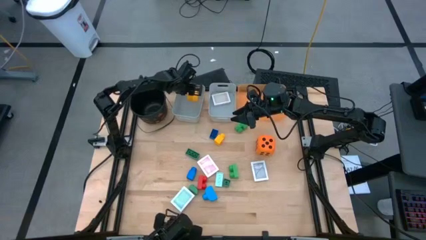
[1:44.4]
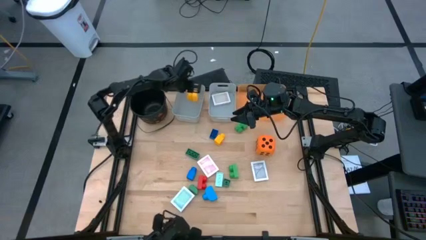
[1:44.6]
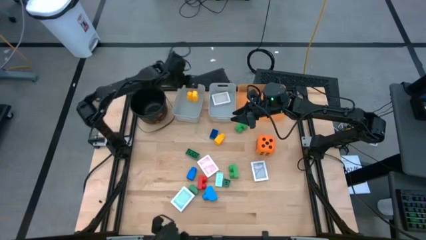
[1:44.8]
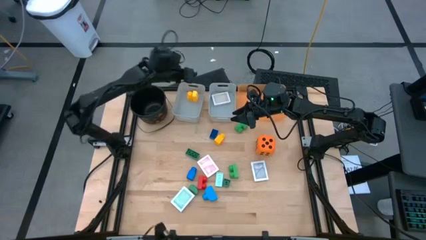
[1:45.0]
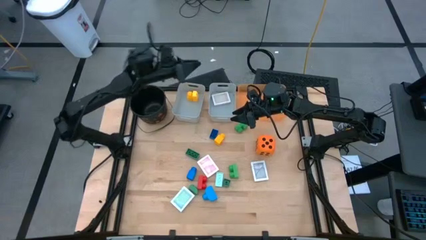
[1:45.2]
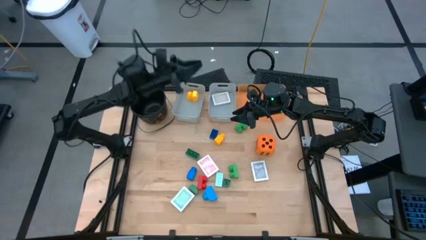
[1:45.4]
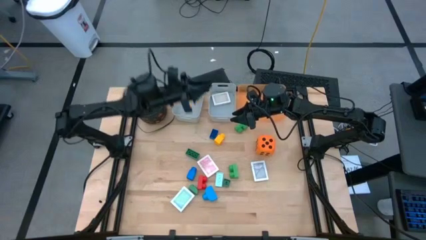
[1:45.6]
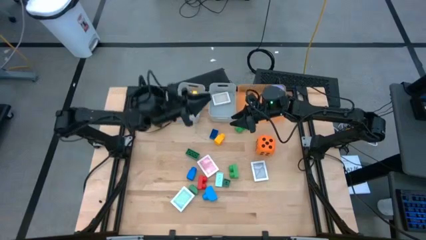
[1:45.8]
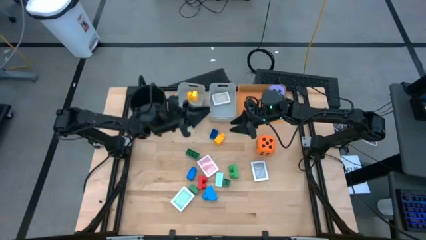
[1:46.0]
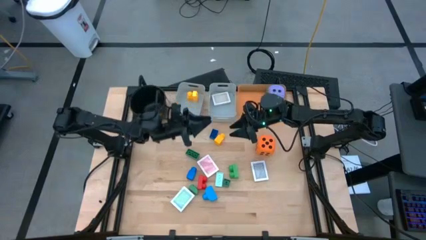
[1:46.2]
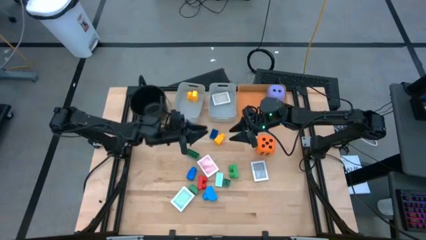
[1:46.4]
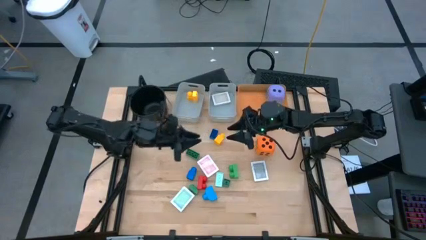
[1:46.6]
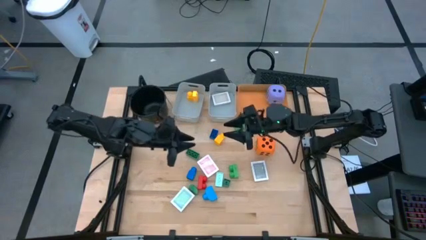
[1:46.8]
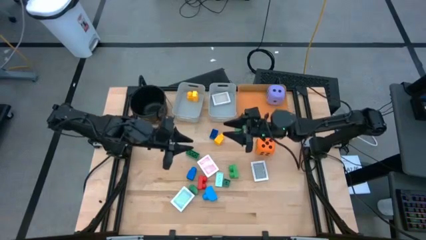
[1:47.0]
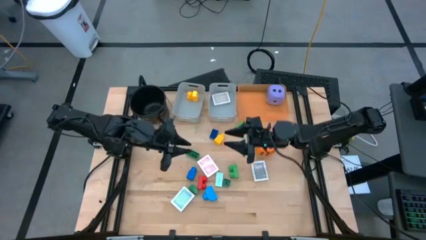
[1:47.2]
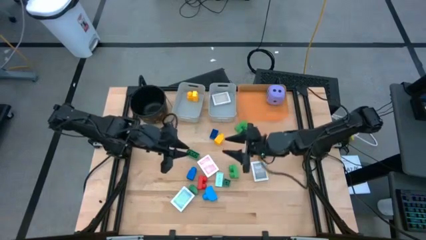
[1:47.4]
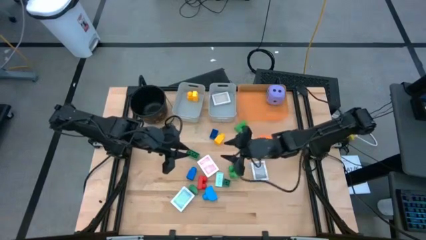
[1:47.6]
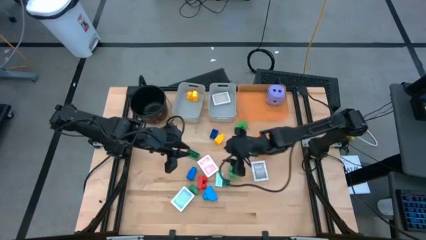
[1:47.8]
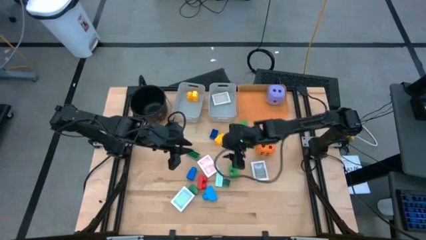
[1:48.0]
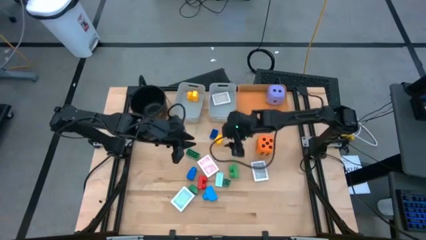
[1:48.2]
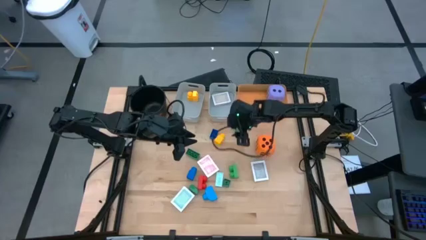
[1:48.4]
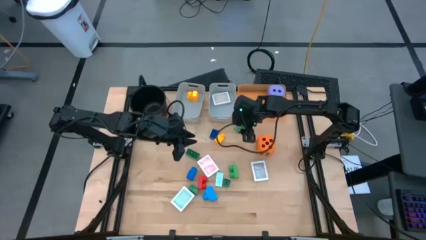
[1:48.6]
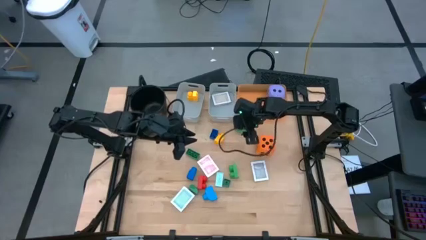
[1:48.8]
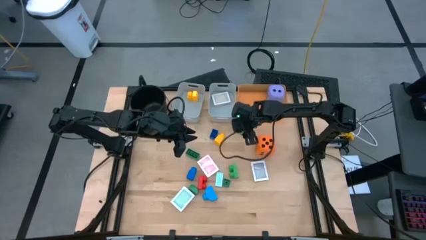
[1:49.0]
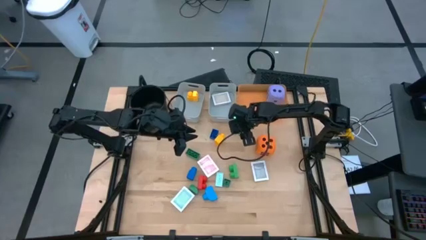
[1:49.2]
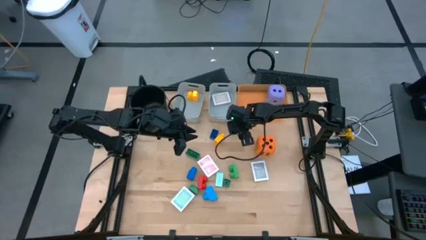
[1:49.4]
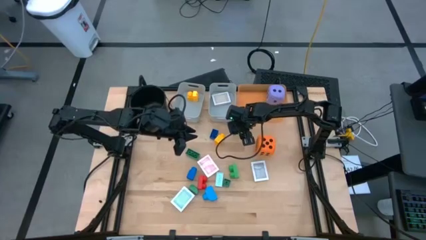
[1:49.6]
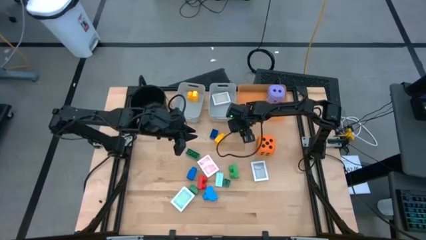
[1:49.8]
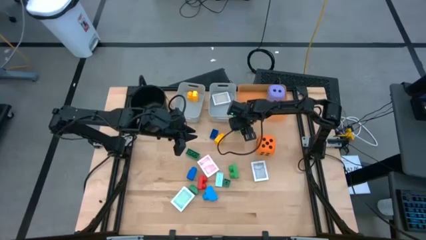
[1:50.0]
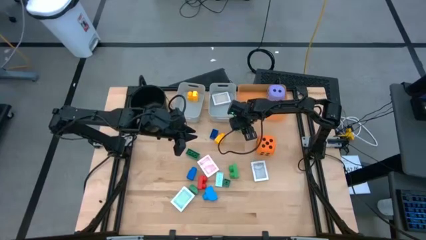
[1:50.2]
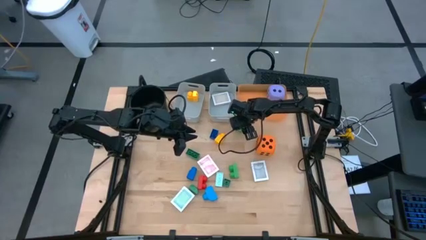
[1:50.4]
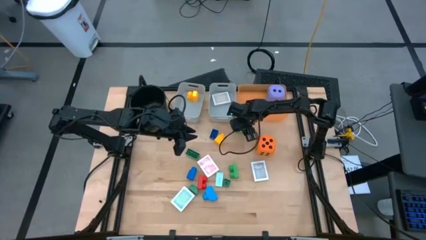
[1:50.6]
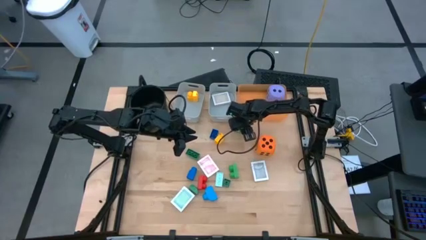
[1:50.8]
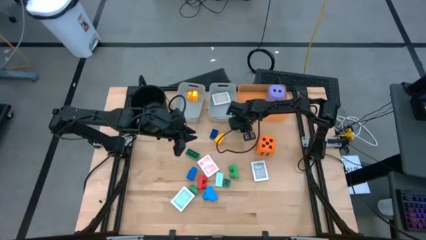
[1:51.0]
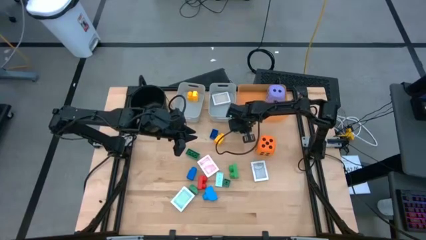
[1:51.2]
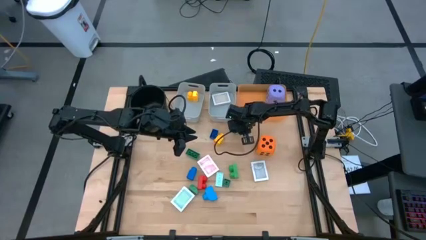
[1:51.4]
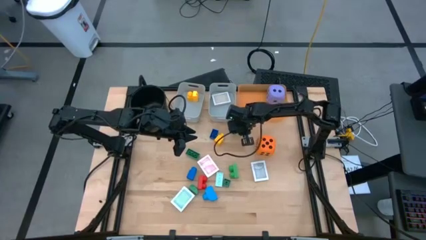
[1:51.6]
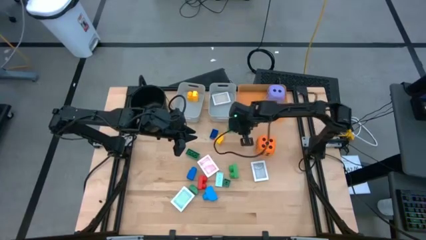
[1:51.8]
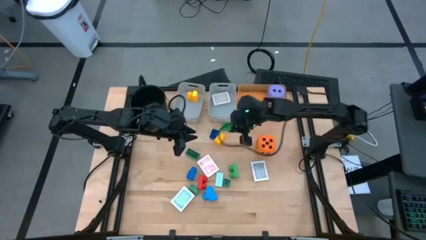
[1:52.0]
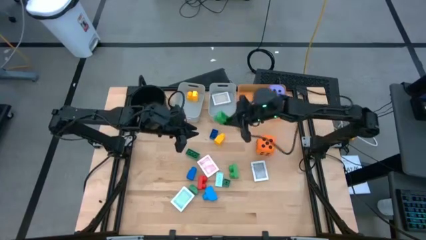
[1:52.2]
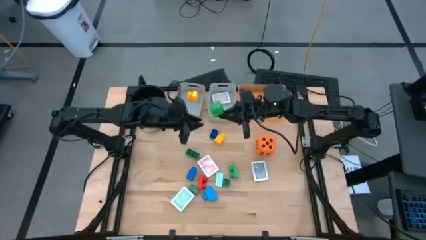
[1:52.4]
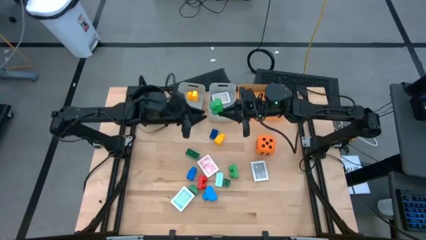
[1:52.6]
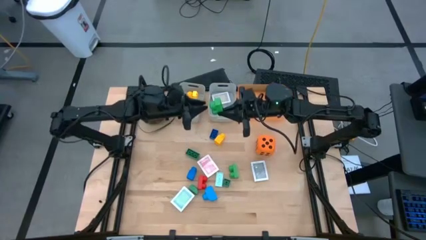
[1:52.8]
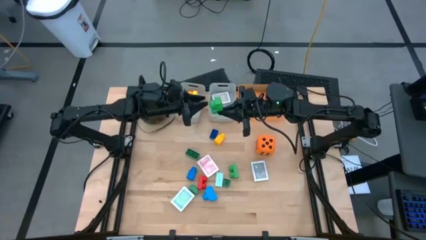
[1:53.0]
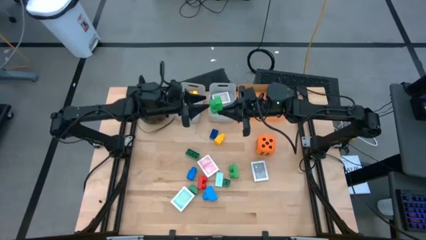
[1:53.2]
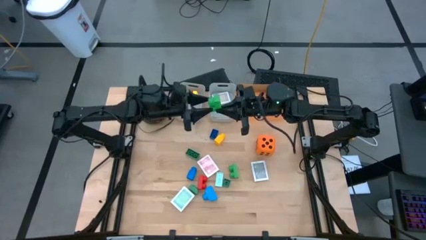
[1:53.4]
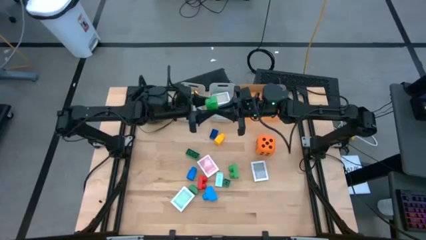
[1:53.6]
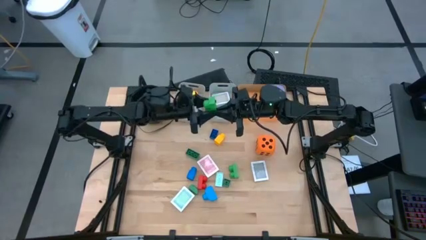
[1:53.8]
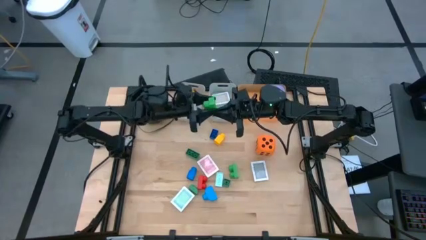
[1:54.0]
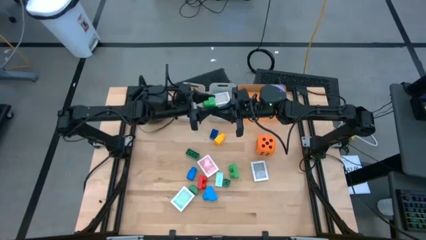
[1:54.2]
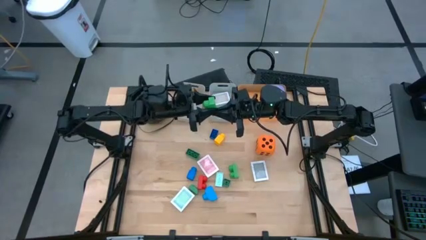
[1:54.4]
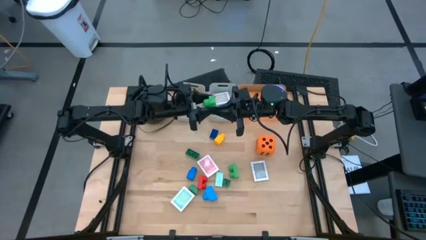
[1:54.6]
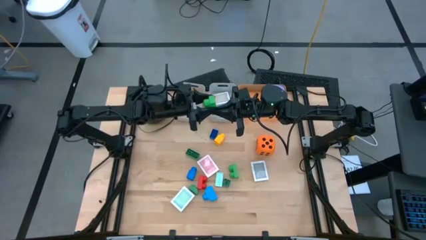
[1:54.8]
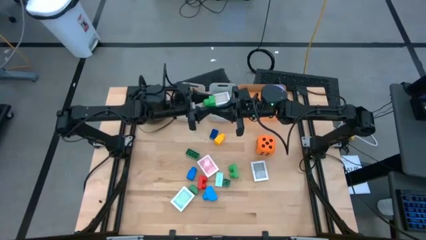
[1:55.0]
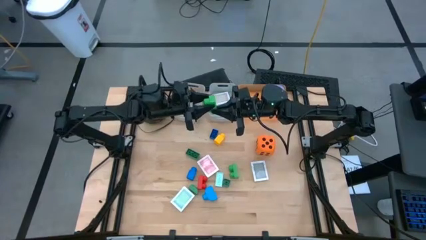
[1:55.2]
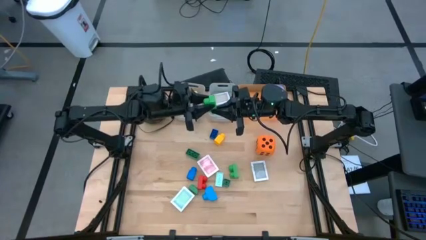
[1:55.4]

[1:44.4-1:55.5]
Task: Pick & Place Toys
Put the green game piece into the left gray bin
